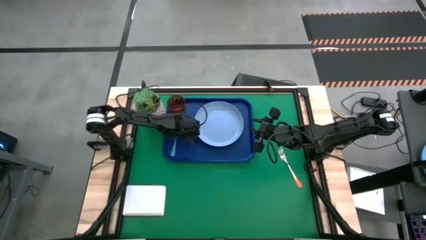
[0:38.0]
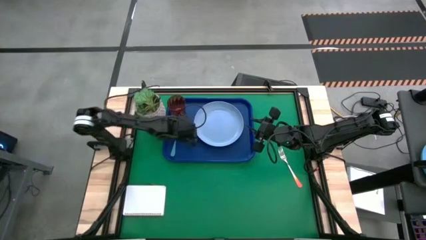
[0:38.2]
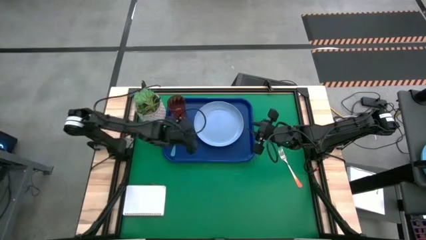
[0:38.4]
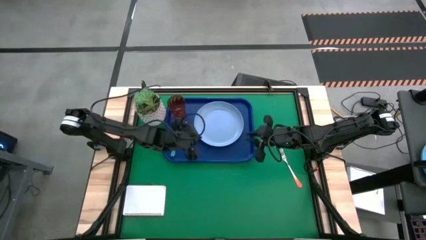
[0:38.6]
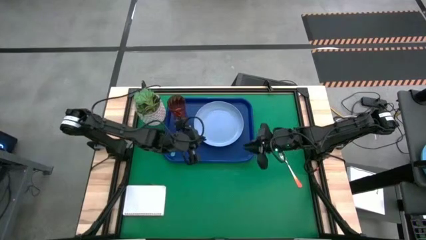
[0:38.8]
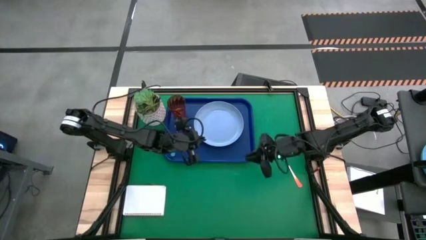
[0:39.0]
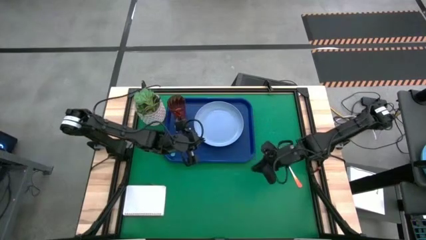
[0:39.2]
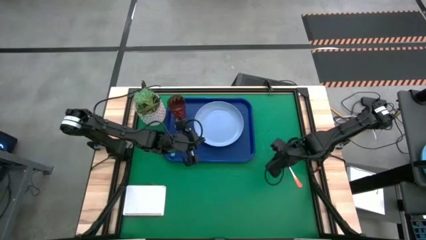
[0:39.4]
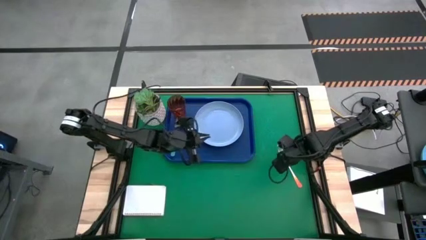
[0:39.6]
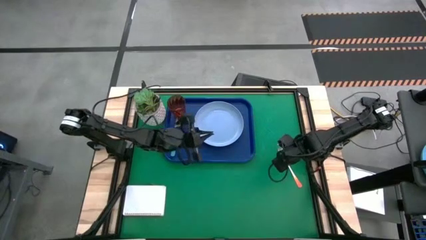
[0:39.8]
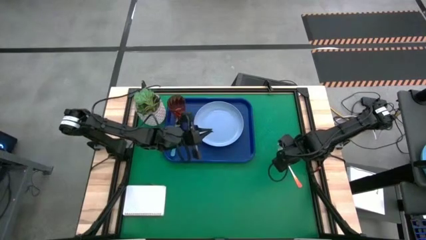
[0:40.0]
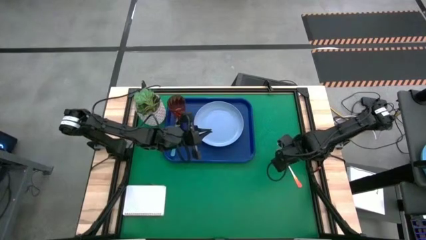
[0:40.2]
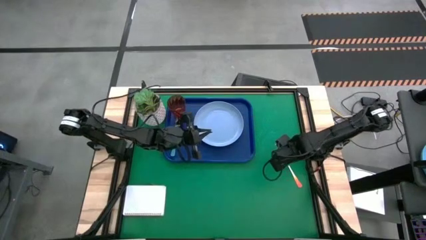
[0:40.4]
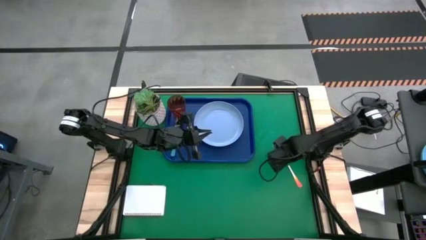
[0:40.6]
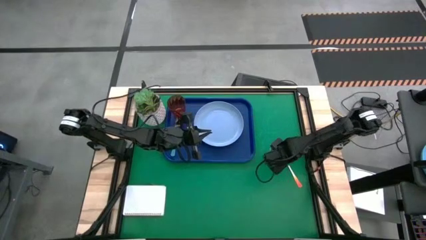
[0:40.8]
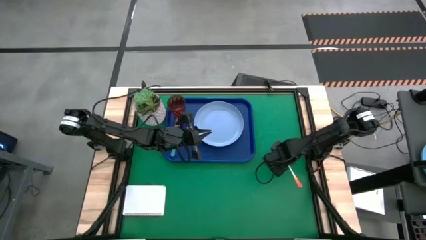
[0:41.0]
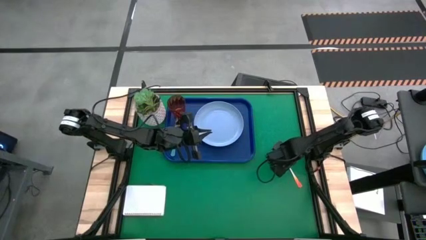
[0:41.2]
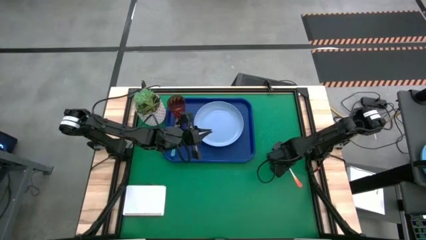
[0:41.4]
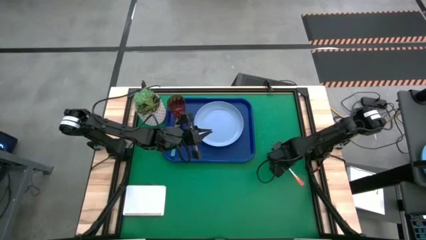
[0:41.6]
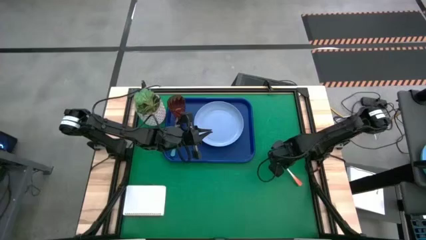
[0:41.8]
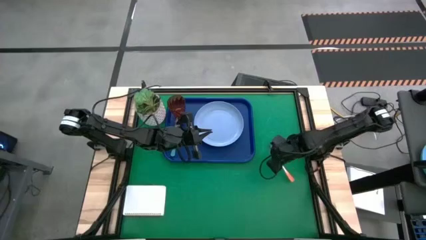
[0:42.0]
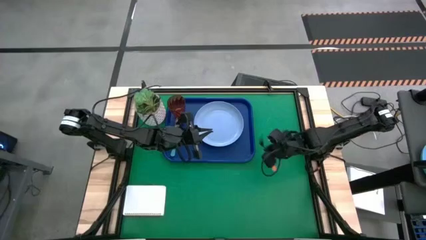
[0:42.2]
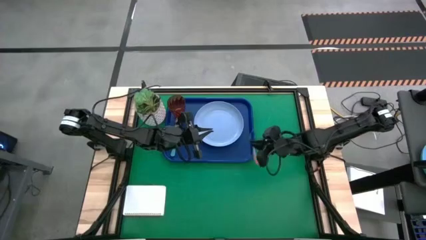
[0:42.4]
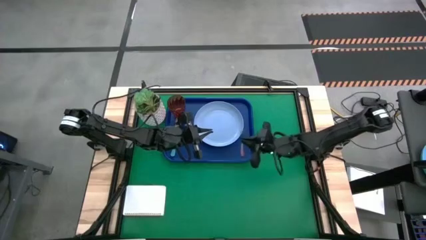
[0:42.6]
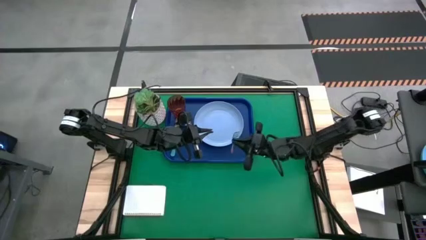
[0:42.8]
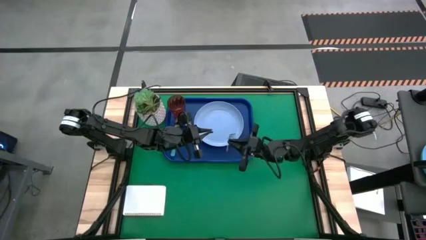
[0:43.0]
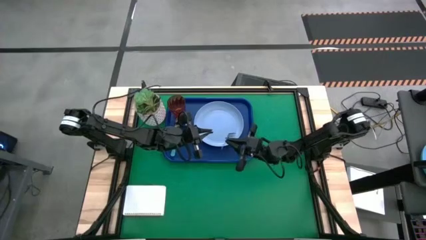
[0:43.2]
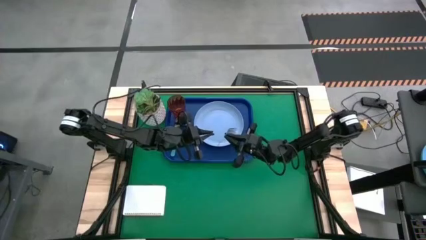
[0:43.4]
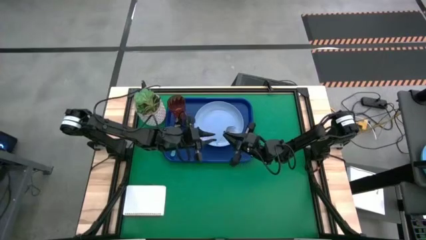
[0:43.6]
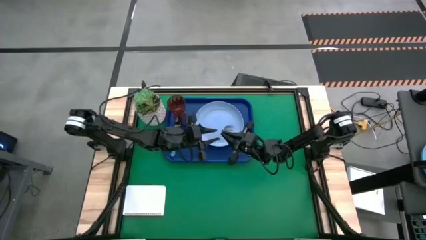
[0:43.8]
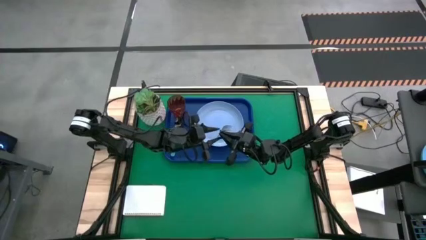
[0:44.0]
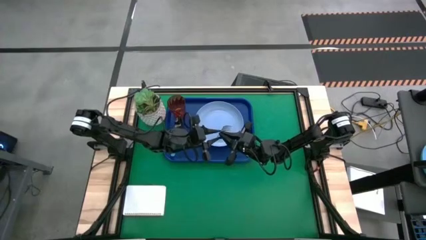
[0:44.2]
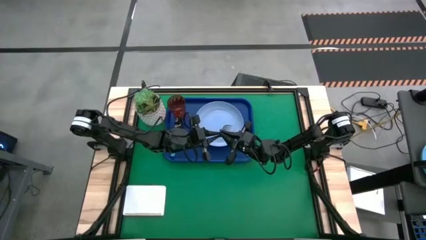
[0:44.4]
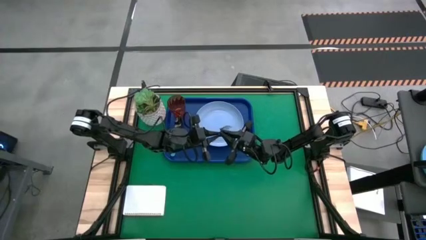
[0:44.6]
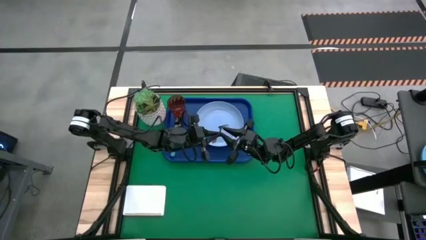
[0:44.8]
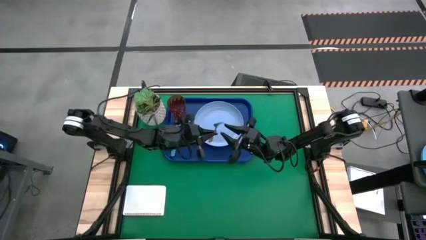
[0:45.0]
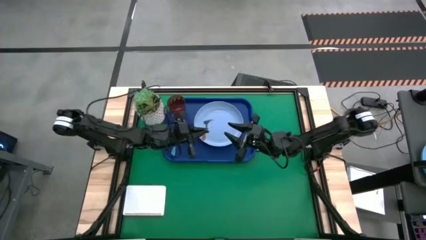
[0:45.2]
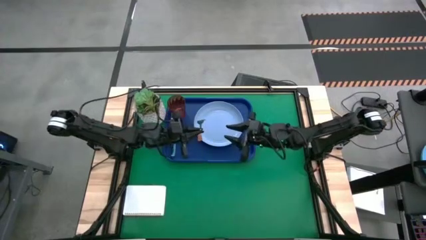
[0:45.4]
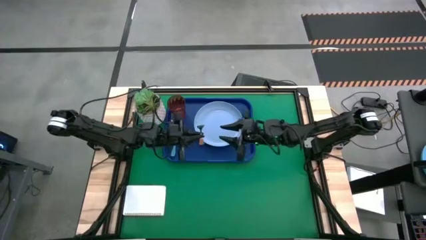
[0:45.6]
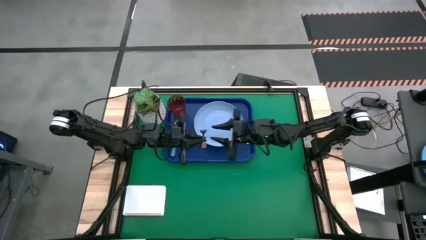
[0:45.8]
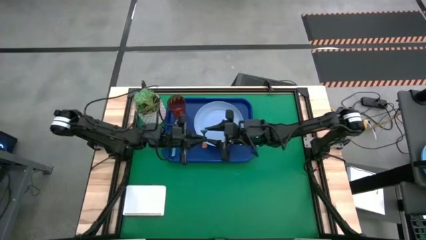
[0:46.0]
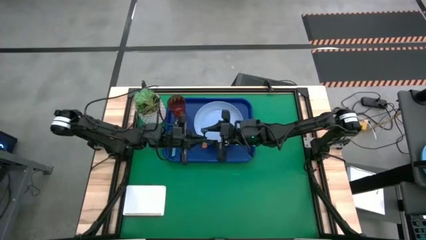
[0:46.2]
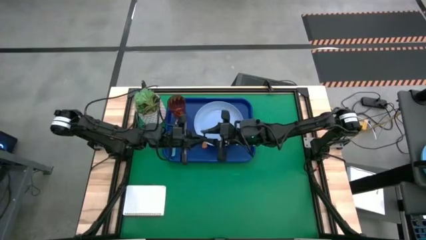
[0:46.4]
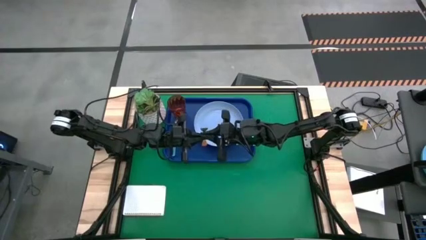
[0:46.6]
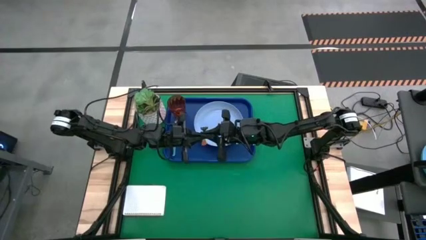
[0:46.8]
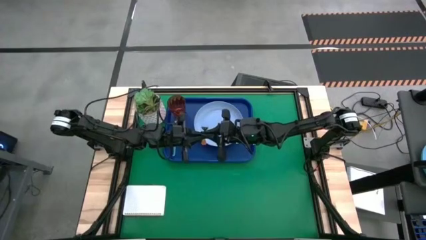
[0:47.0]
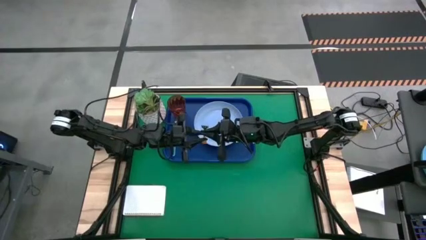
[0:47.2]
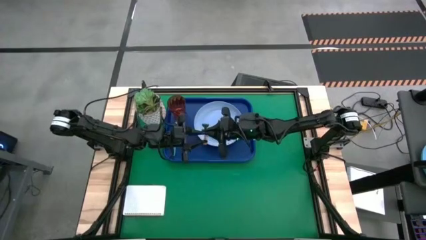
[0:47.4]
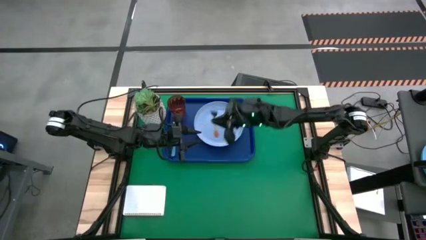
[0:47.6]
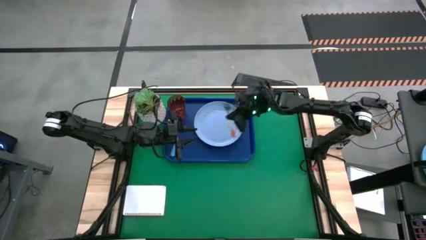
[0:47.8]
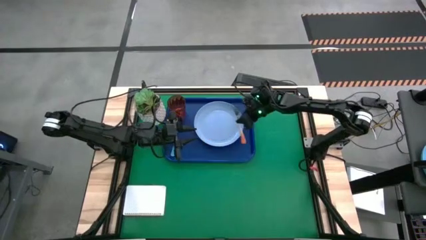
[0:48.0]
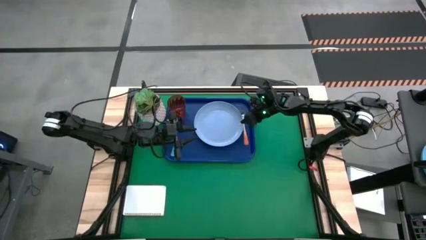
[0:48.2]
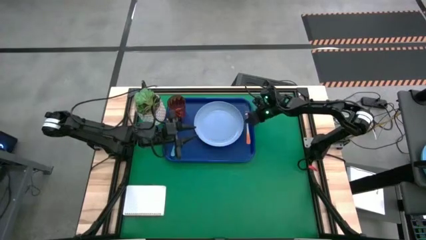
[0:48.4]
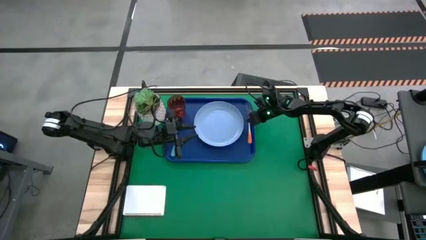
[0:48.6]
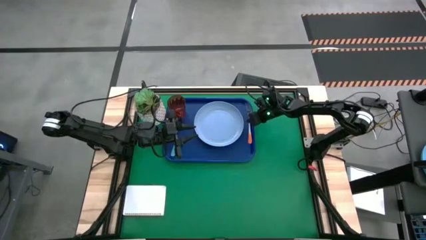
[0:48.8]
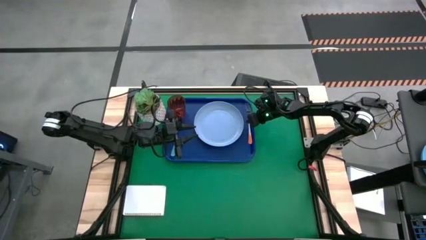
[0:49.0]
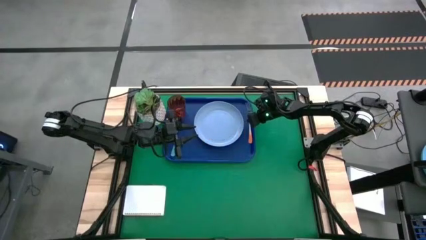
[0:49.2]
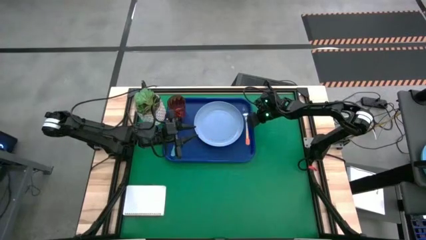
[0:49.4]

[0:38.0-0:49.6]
Task: Pick and place plate/cup/fork/spoon on tray
Put the orange fork on the blue tray to the right of the blue plate

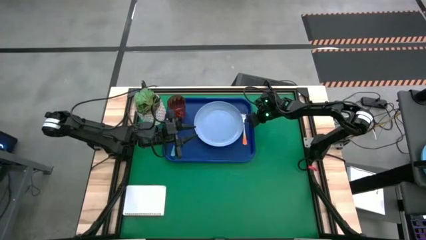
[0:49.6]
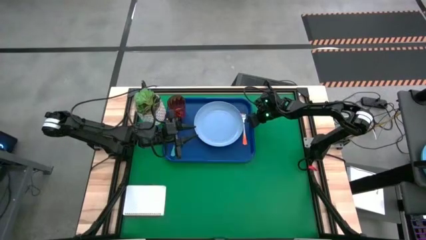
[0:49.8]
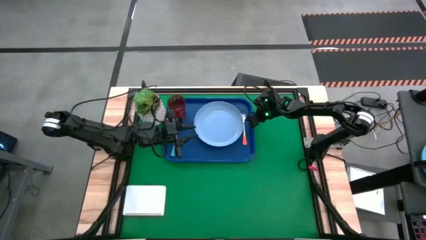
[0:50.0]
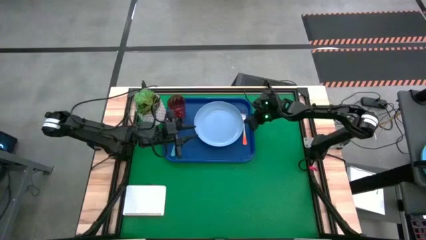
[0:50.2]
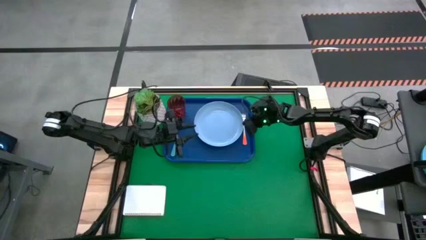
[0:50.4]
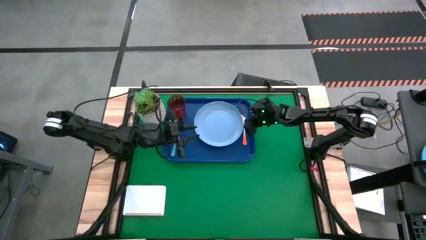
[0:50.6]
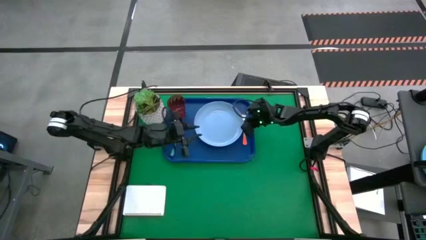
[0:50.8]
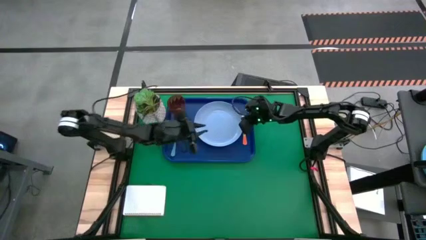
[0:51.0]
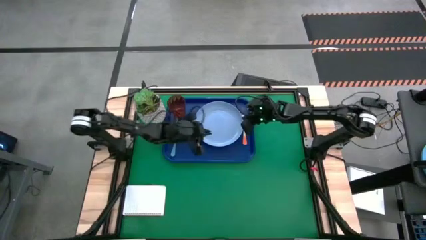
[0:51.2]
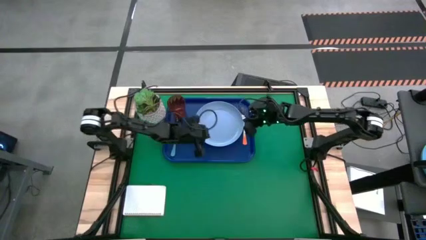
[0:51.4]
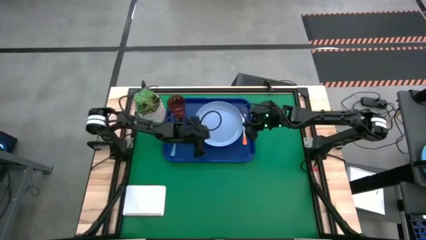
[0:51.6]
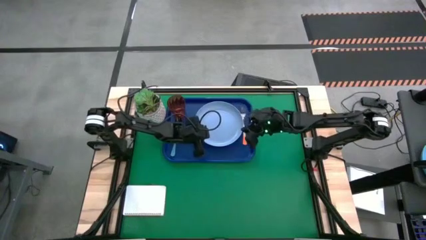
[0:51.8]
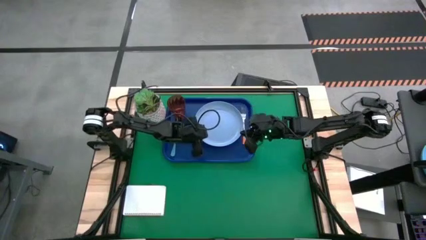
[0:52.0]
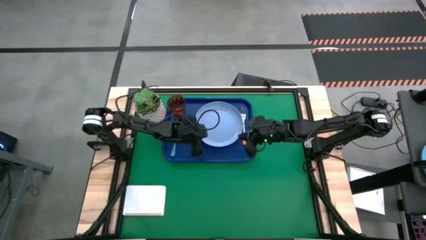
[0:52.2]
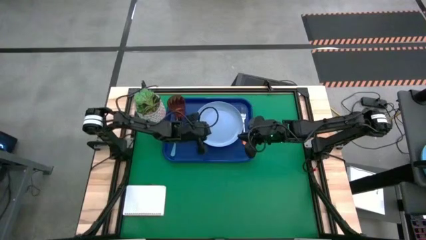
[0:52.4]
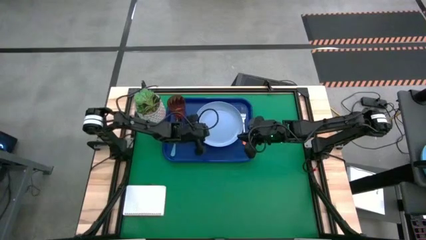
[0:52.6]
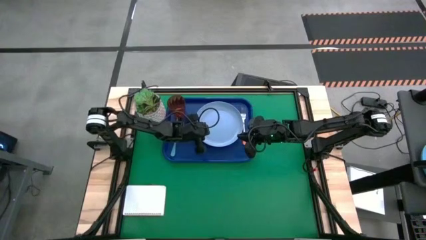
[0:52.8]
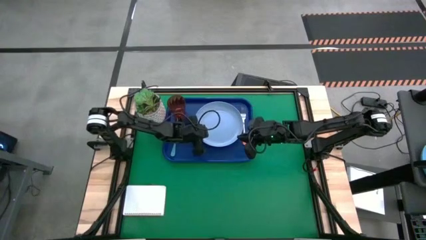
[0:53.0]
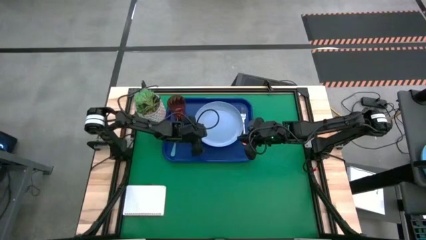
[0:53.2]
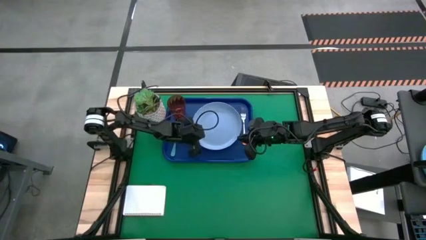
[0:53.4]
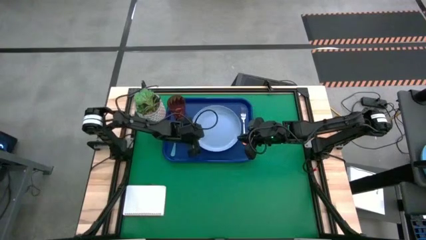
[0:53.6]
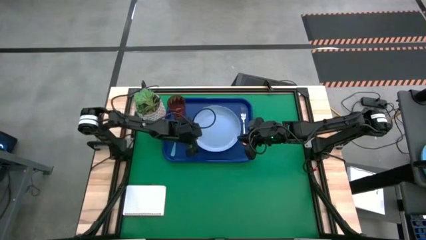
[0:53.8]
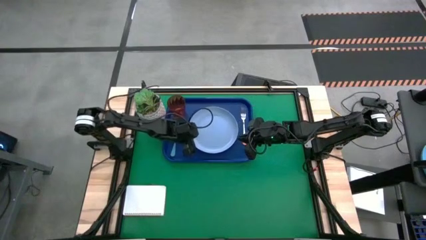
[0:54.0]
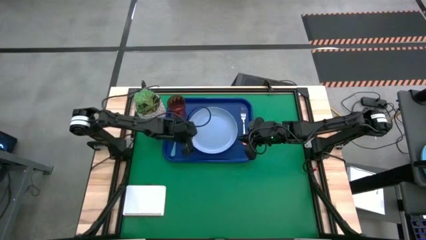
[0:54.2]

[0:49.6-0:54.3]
Adjust the blue plate on the blue tray
